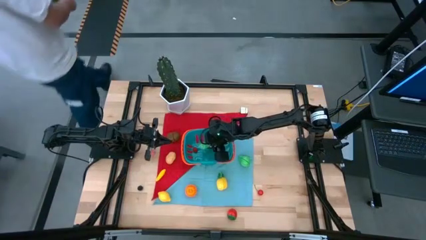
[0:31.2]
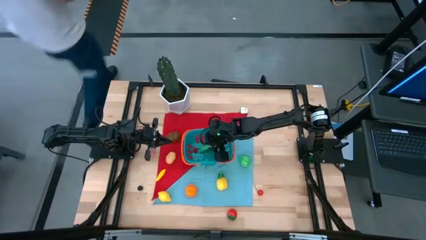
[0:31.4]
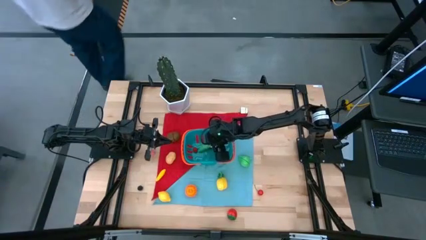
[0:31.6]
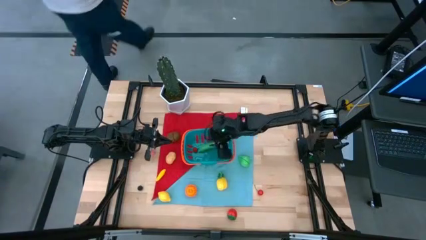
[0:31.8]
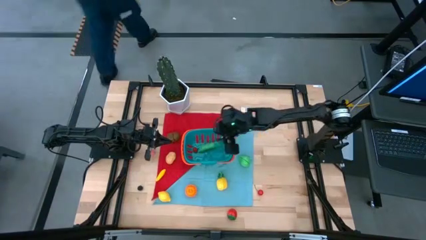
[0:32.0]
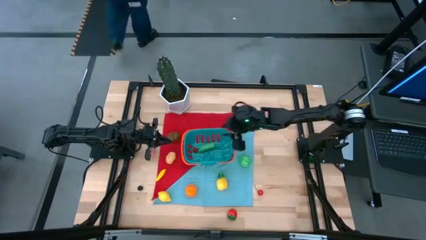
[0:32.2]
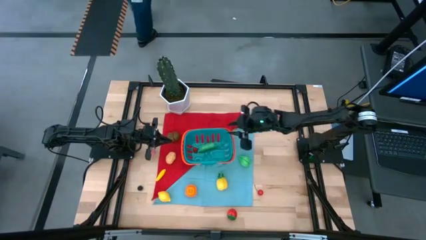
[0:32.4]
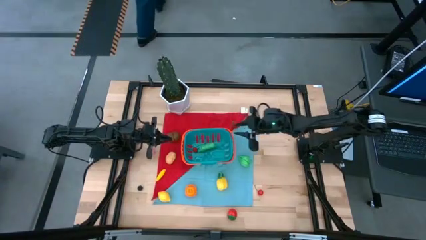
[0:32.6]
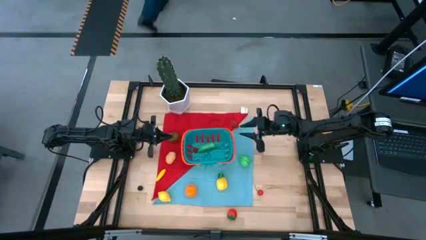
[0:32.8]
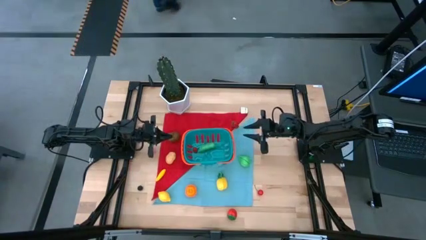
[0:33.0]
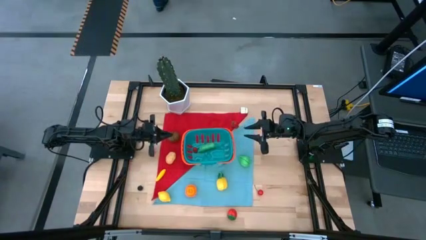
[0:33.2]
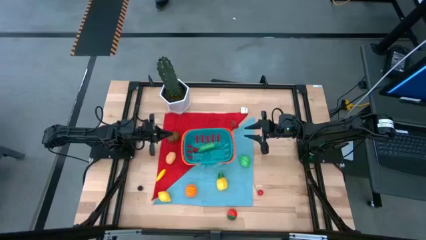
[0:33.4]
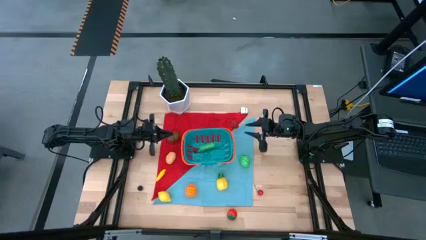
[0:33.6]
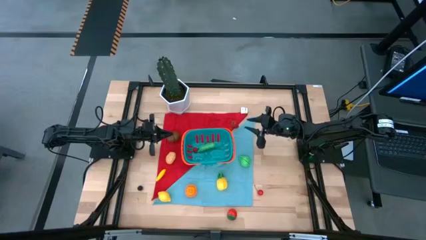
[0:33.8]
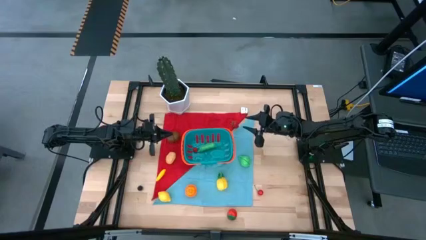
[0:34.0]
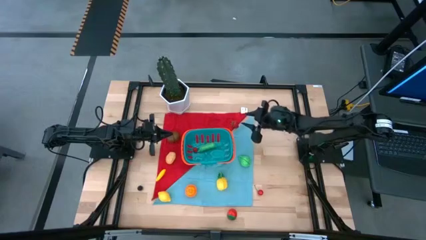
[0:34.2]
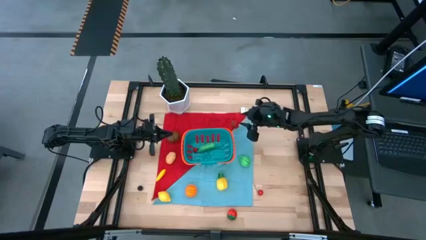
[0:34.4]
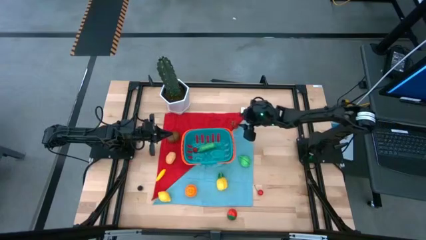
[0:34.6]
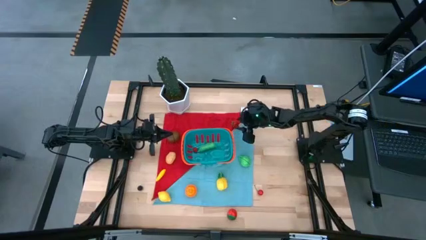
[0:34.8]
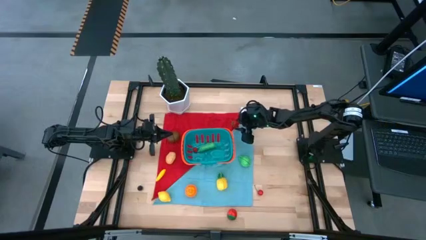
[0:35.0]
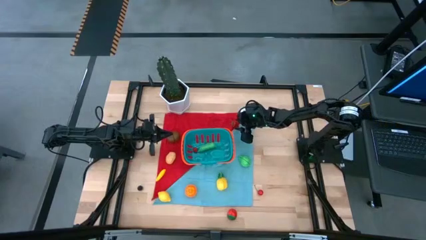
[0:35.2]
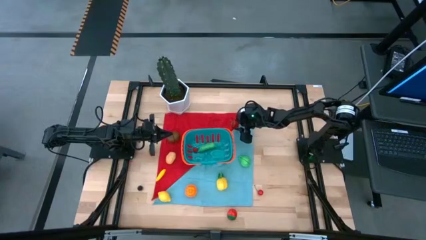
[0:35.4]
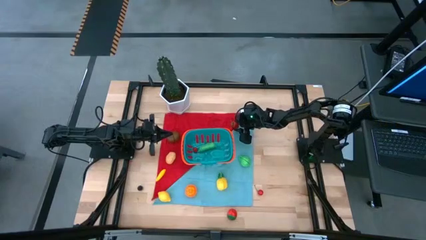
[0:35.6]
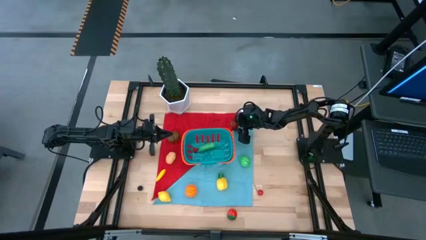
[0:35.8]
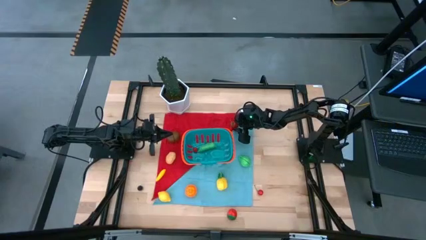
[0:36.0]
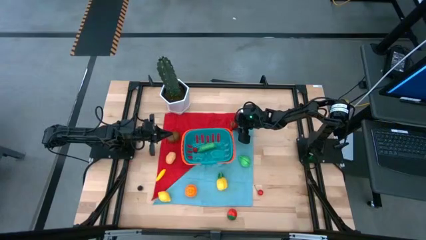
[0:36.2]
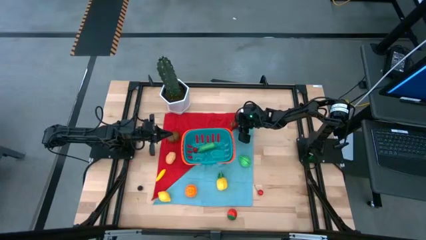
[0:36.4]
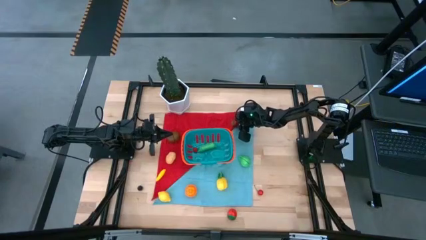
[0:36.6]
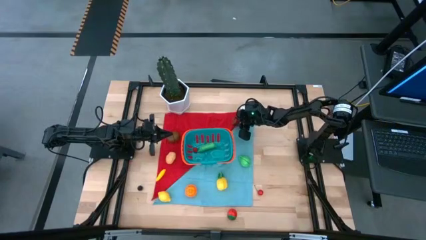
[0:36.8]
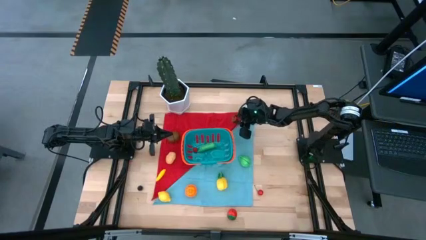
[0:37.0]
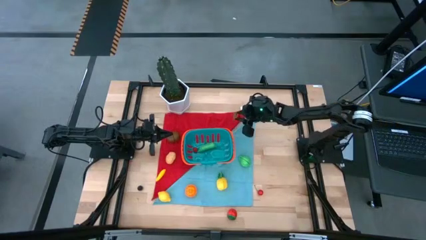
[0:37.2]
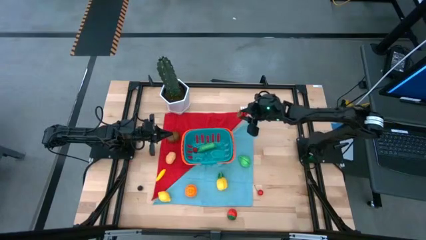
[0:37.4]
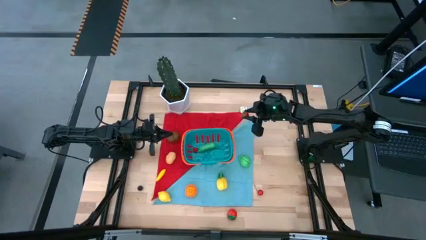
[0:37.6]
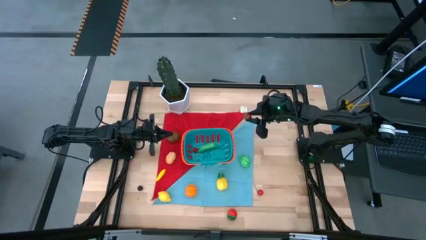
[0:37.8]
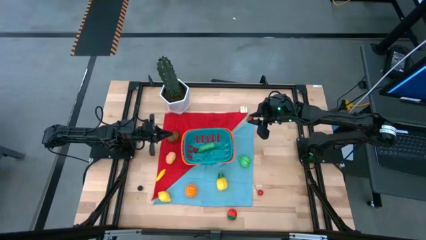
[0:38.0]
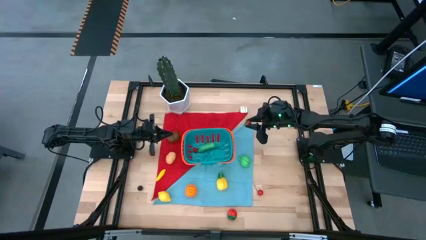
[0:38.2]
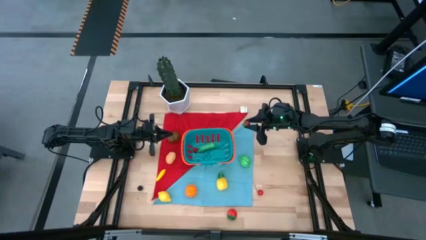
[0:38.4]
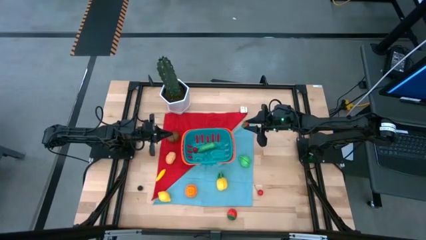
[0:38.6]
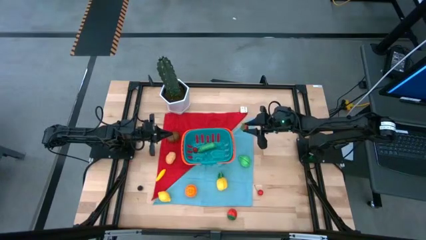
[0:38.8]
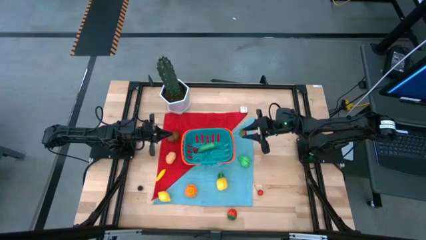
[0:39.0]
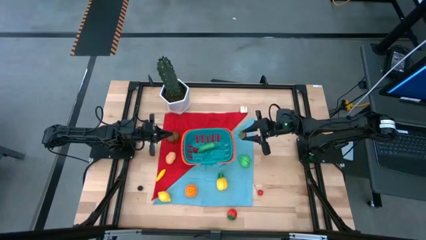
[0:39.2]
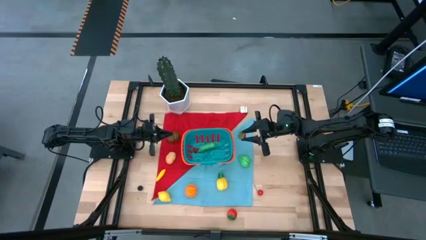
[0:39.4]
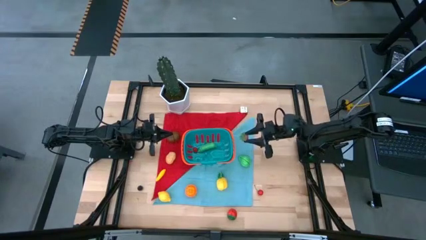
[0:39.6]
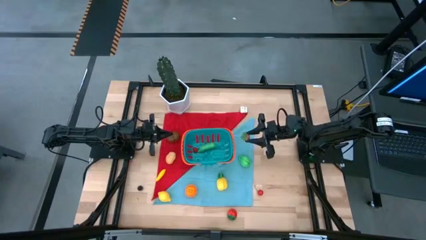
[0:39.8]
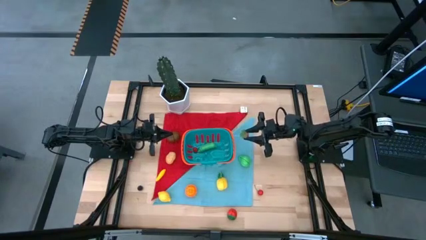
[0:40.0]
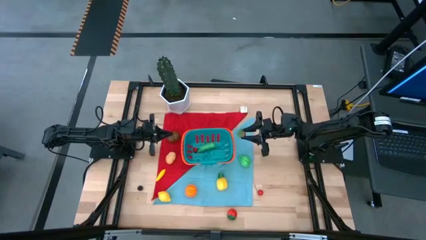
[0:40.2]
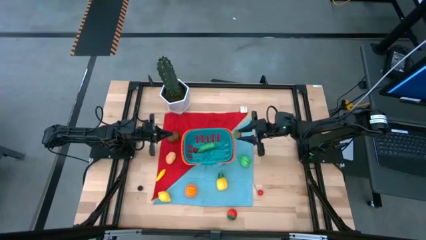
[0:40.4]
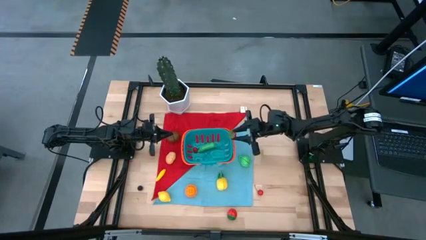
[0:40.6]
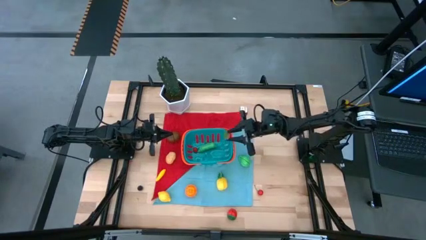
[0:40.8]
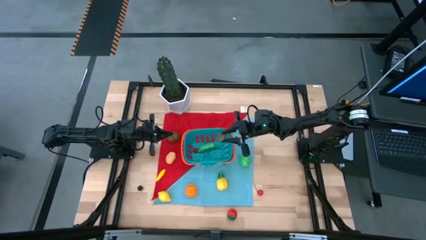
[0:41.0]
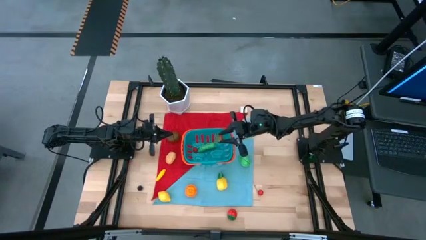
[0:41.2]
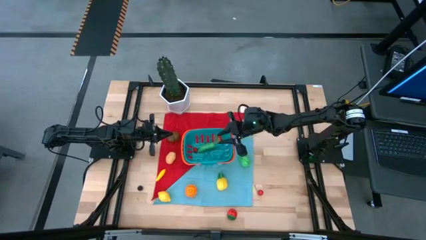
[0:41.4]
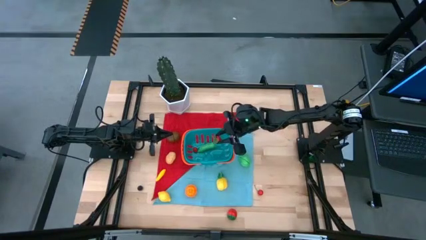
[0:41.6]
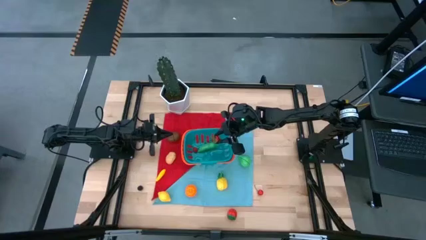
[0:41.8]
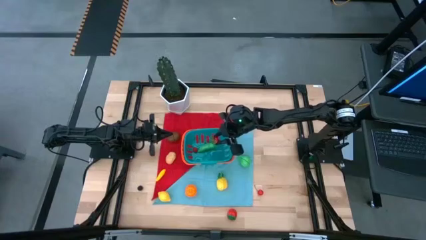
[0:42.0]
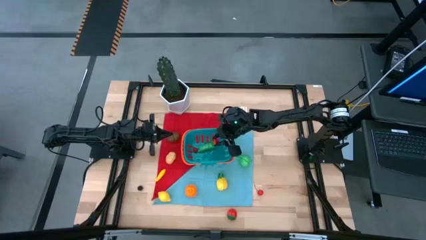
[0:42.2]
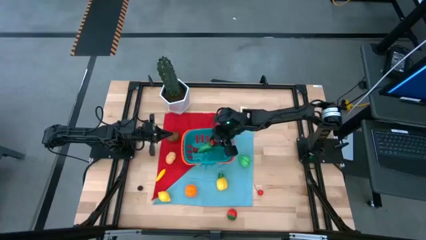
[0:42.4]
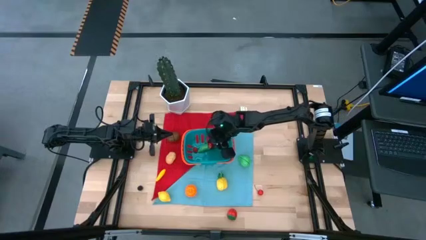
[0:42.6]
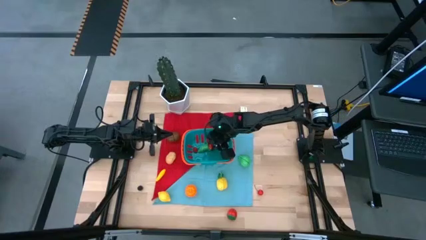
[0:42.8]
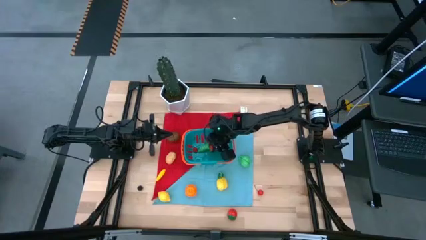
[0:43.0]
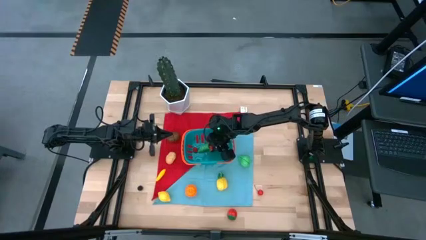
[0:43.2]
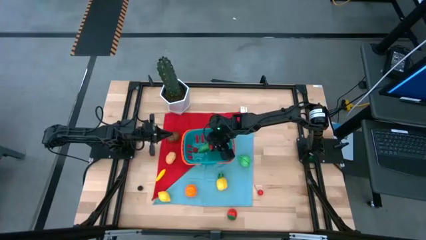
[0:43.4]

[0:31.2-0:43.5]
Task: Build produce basket
Put the red strawberry into the blue basket
